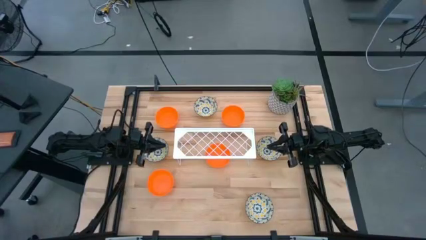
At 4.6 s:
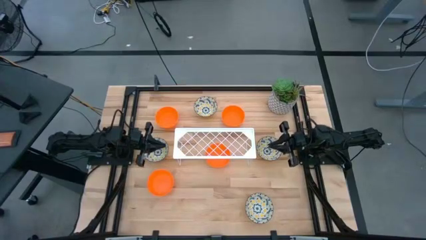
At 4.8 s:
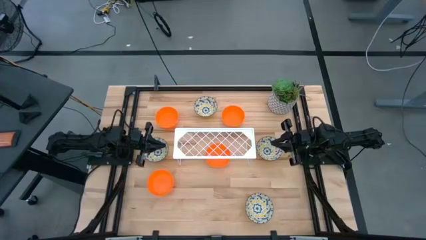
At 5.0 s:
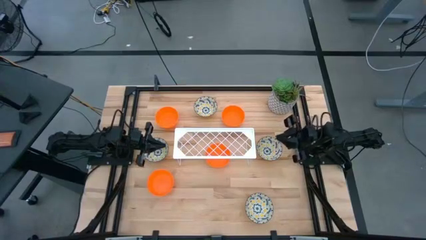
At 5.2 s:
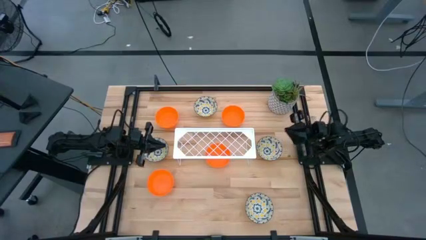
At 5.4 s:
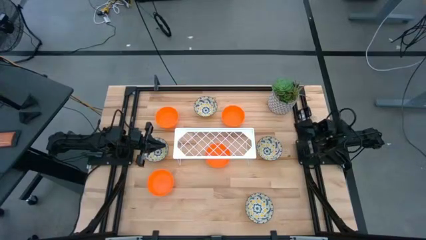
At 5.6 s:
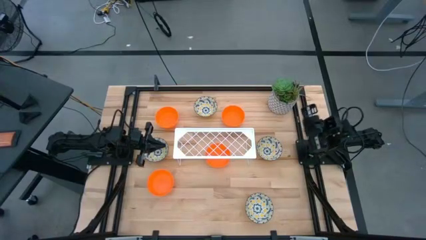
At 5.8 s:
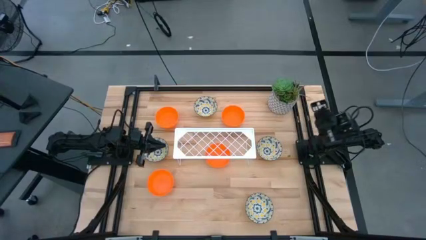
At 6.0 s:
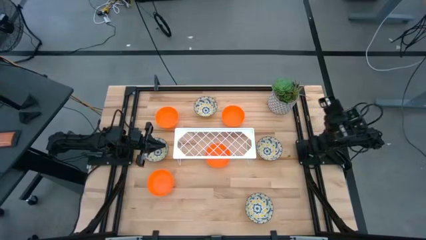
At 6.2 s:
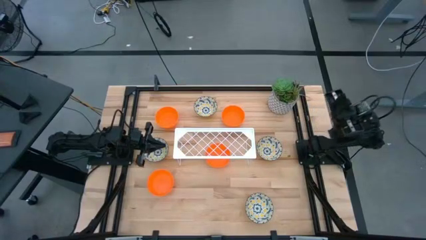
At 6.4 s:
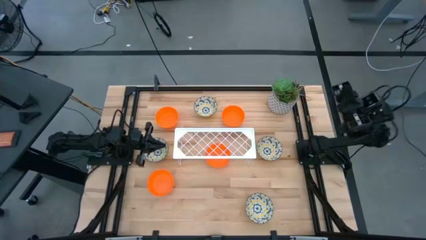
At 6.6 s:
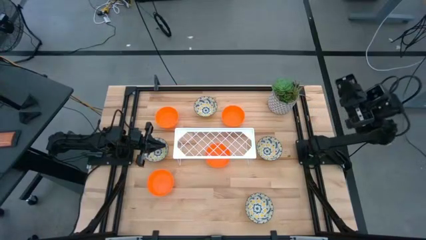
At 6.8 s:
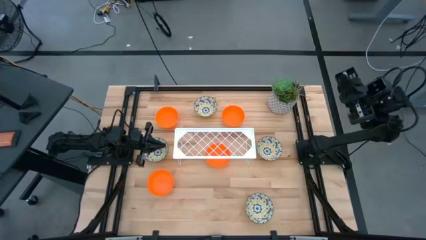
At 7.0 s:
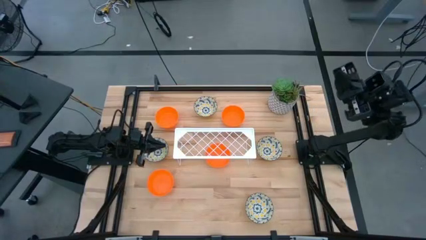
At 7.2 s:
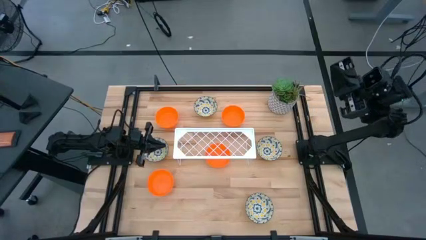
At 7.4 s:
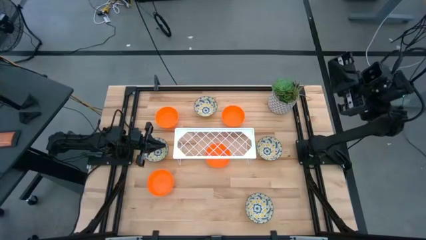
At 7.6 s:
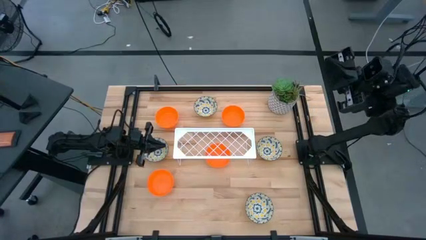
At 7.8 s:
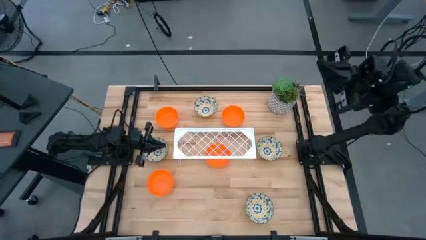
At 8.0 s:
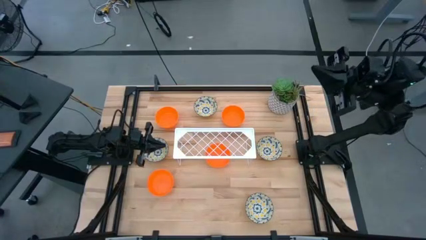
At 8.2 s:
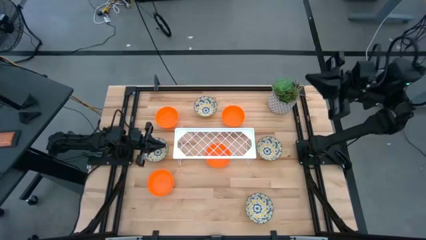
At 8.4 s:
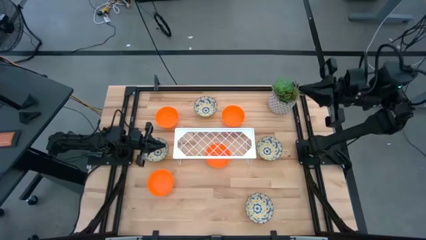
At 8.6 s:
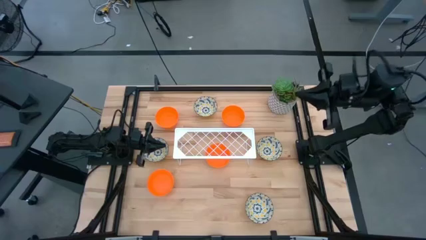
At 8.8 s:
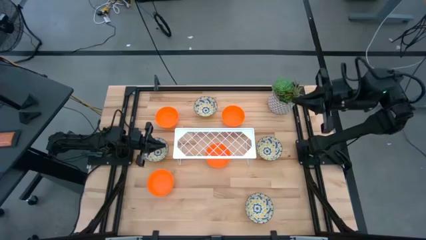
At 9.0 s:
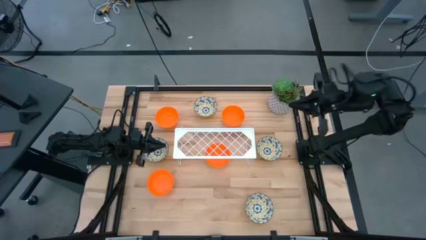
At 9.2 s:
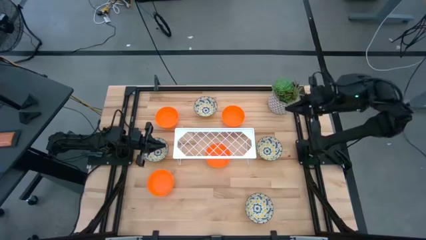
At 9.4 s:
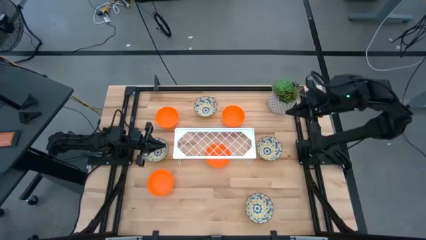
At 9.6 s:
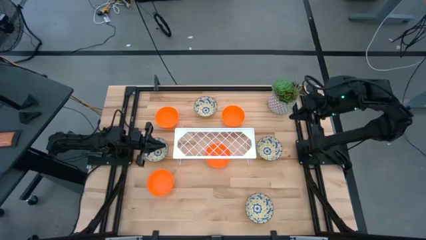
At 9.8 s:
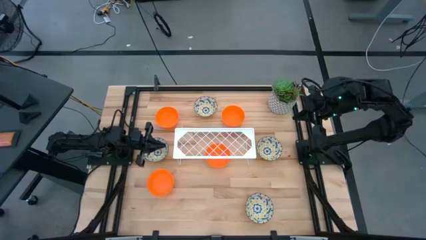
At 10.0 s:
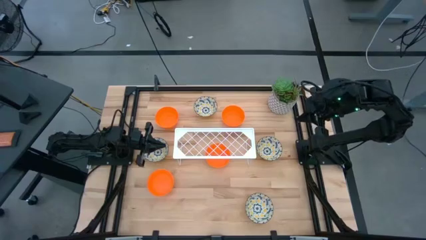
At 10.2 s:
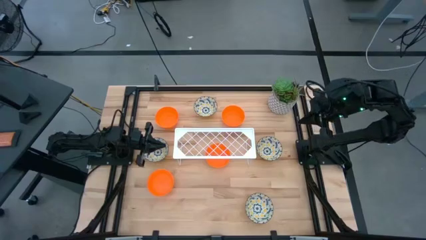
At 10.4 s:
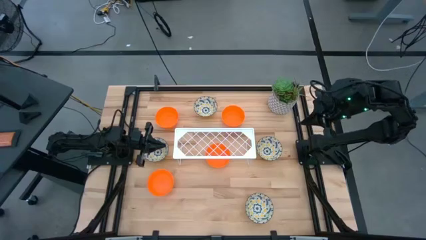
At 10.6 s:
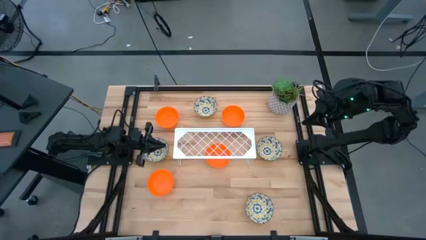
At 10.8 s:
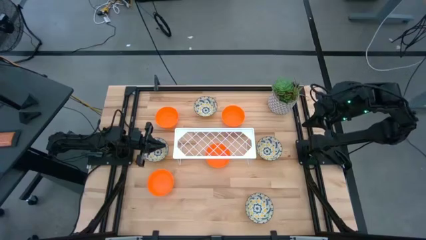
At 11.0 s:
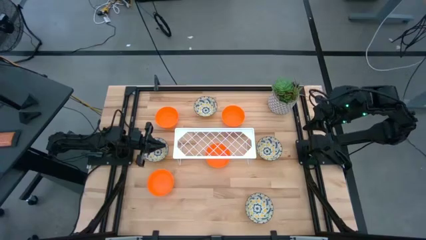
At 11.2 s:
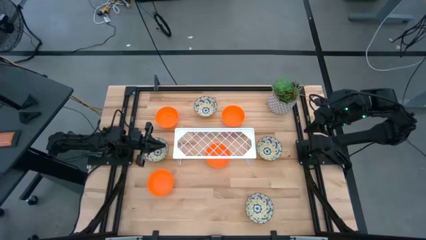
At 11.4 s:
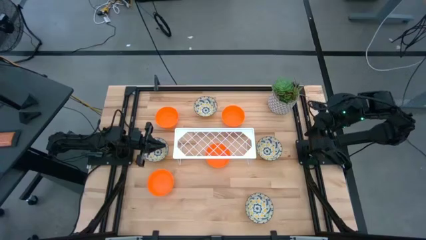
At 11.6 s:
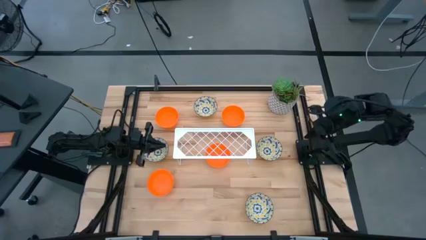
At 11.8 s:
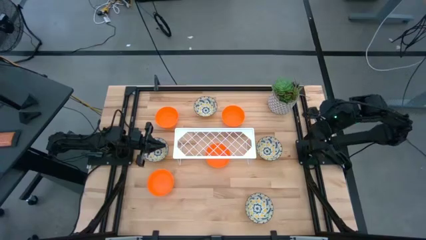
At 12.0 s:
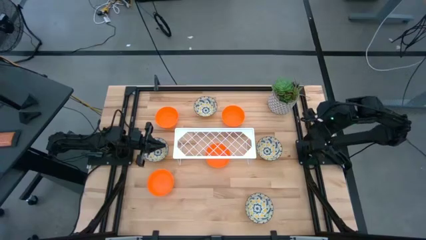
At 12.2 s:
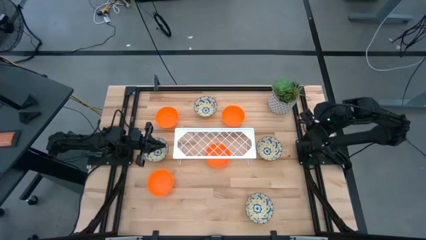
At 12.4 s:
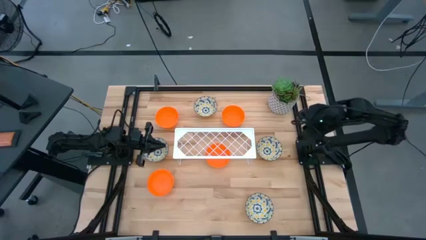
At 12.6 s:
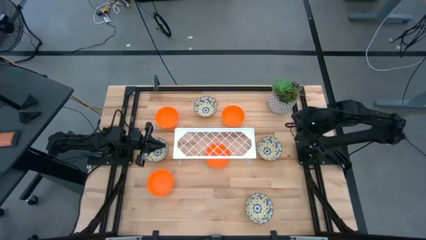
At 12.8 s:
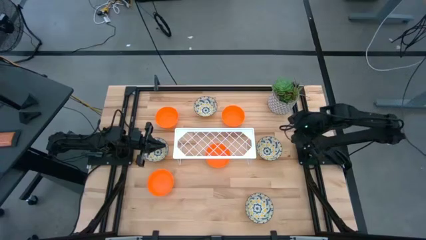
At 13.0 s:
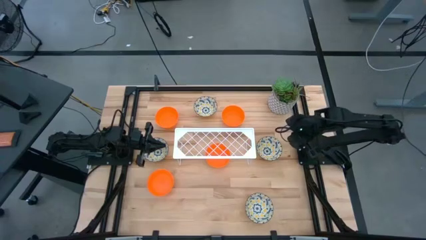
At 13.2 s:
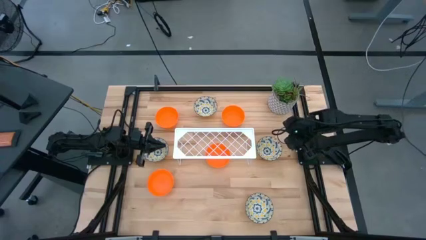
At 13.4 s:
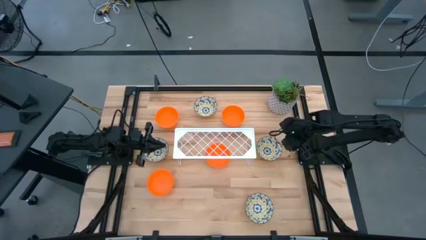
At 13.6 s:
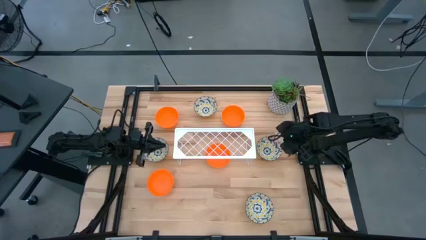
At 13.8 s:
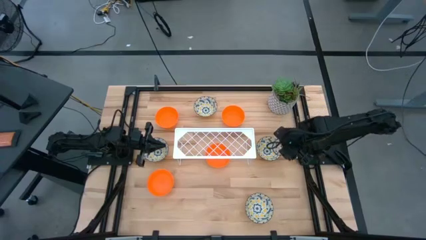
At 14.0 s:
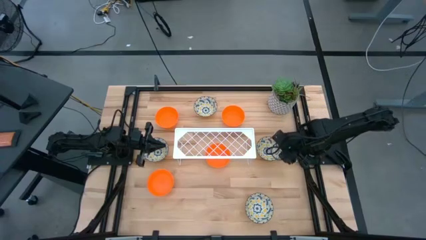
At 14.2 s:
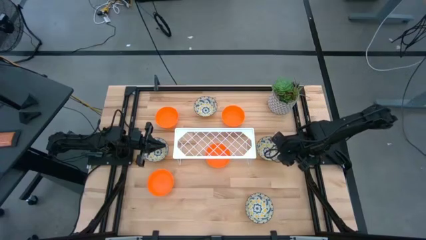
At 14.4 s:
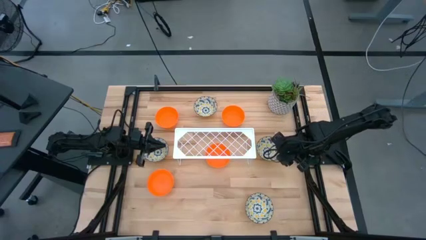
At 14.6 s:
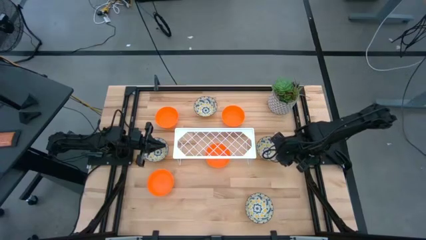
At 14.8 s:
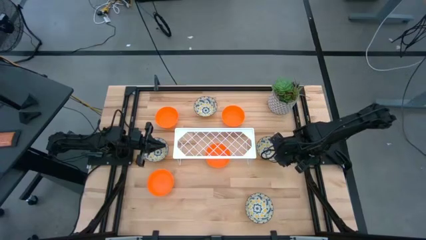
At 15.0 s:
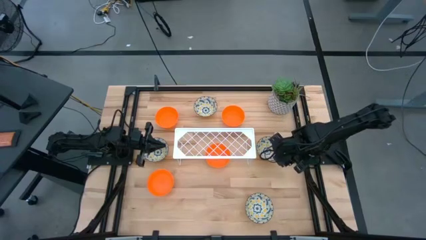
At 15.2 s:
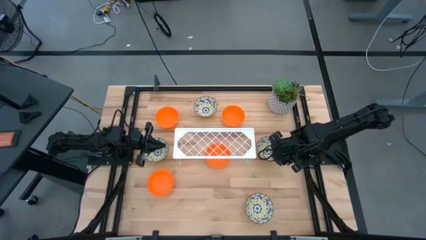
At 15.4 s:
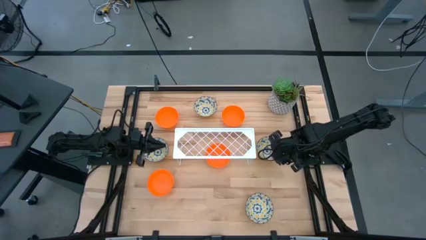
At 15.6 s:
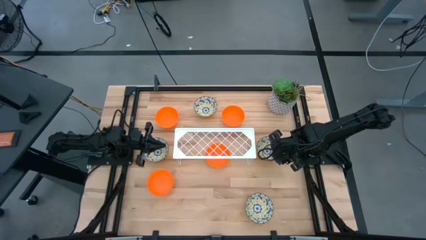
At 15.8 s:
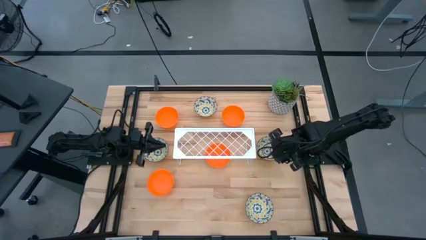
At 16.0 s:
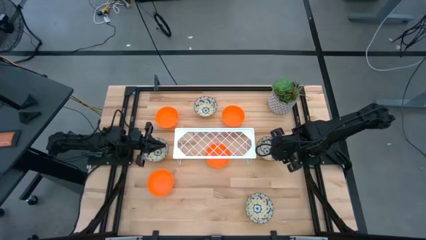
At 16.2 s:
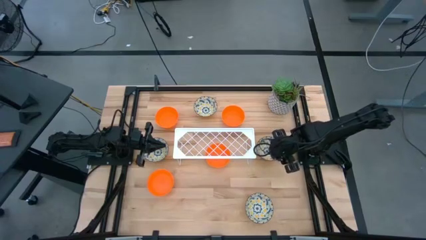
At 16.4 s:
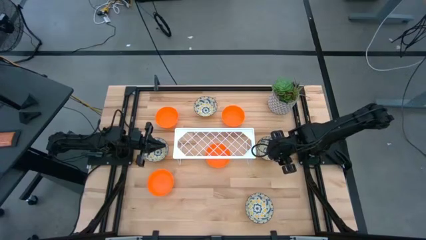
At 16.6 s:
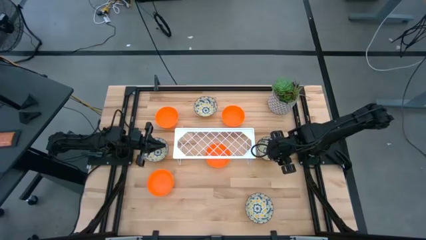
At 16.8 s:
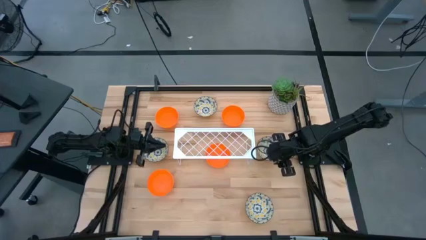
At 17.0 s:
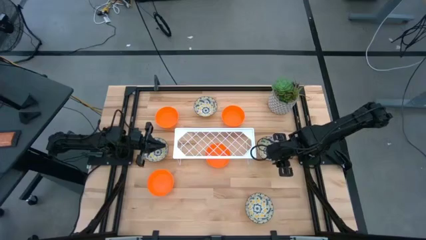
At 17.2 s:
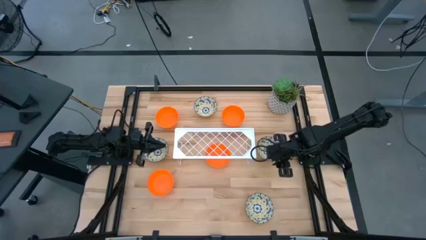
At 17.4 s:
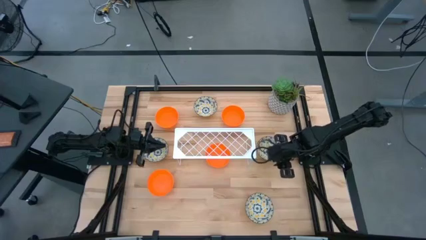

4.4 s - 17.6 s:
Task: Pick & Place Mini bowls
Put the white patterned bowl on the shelf
